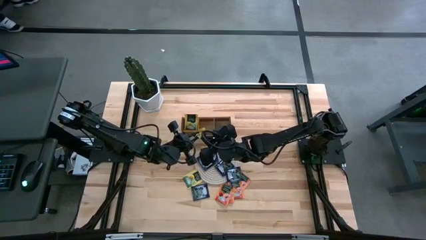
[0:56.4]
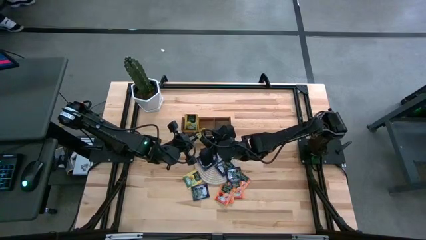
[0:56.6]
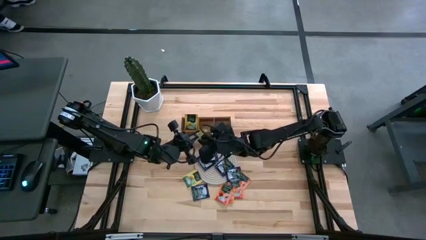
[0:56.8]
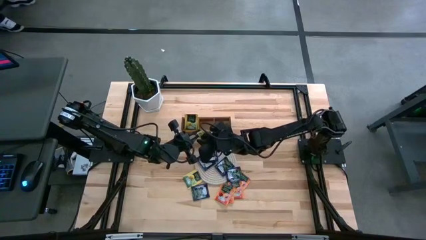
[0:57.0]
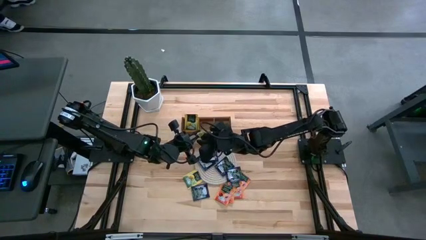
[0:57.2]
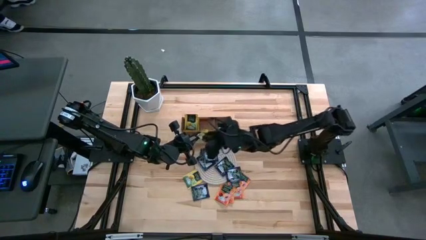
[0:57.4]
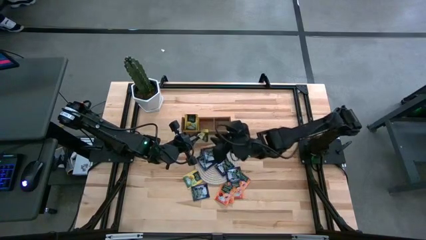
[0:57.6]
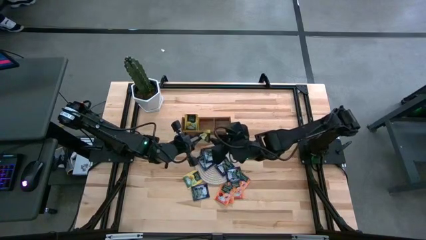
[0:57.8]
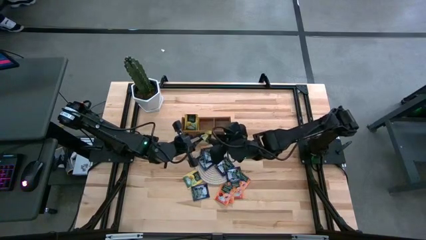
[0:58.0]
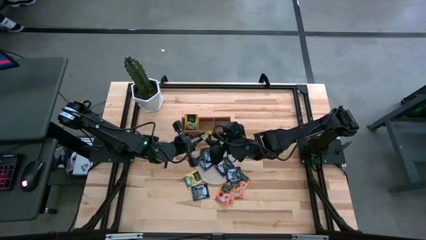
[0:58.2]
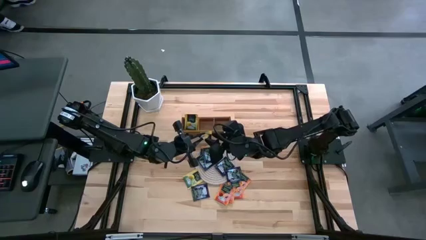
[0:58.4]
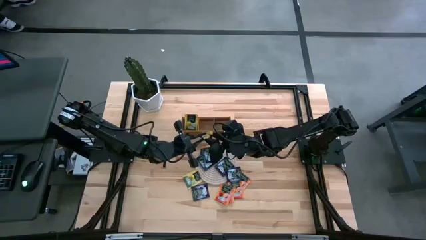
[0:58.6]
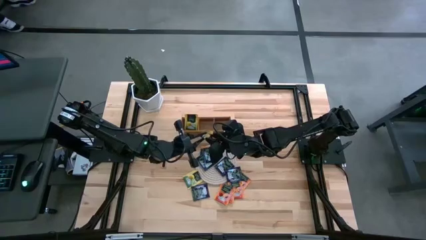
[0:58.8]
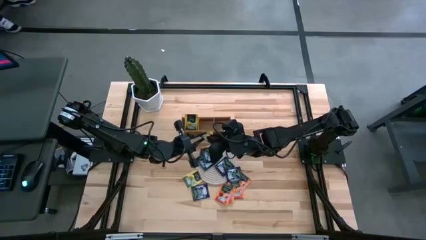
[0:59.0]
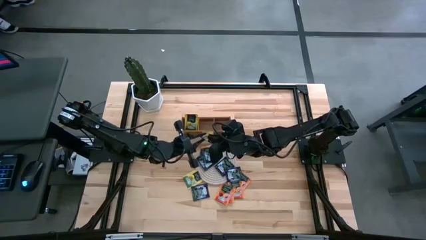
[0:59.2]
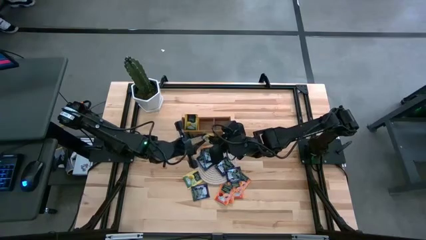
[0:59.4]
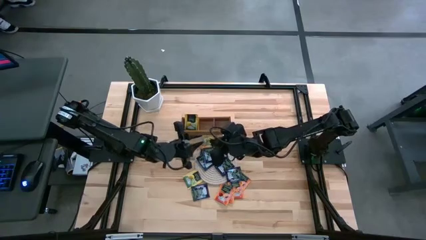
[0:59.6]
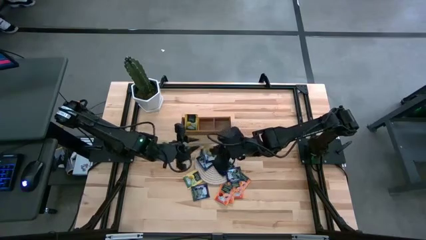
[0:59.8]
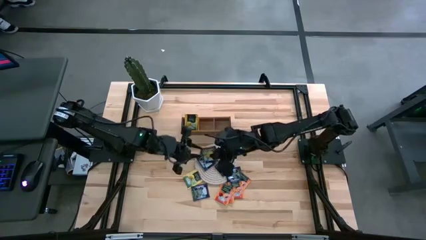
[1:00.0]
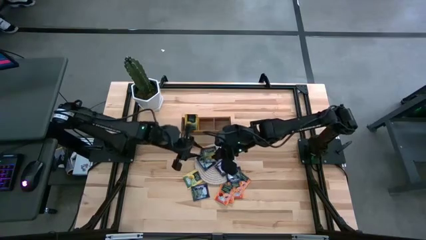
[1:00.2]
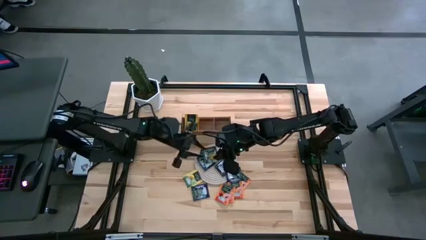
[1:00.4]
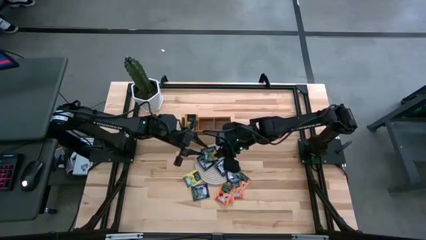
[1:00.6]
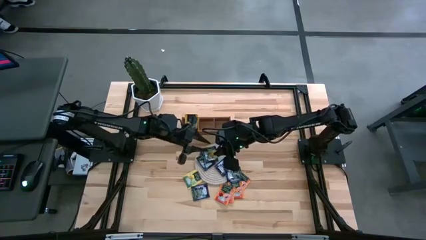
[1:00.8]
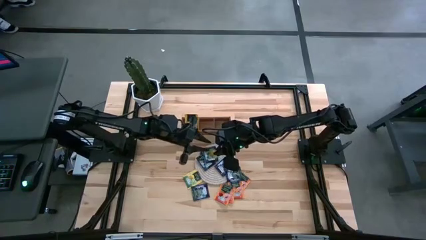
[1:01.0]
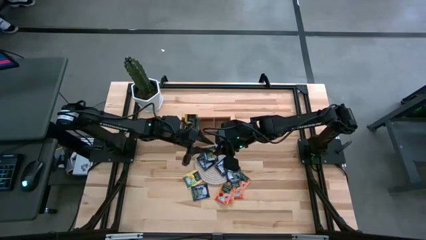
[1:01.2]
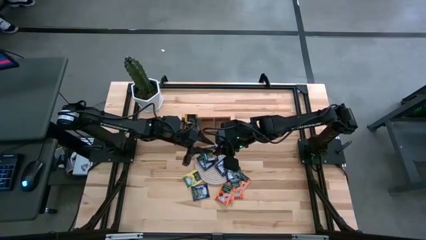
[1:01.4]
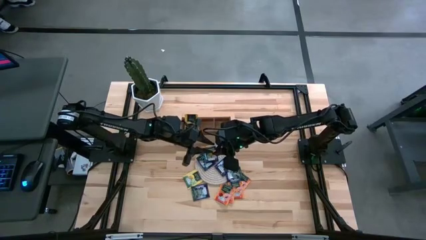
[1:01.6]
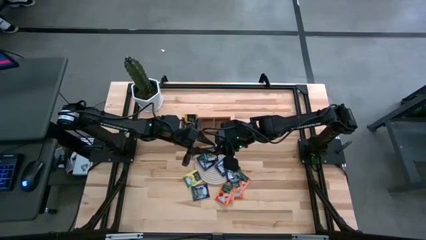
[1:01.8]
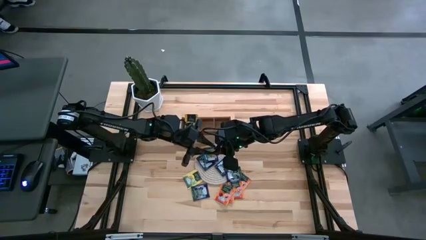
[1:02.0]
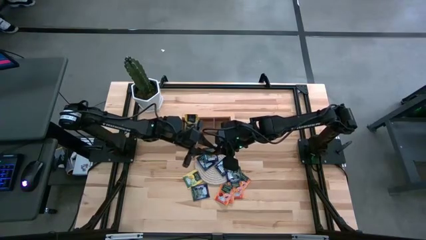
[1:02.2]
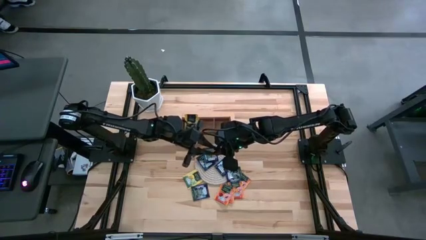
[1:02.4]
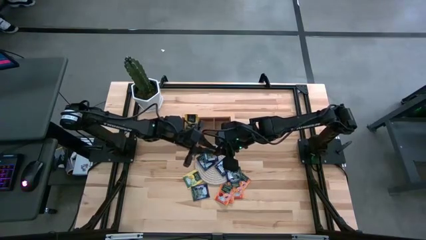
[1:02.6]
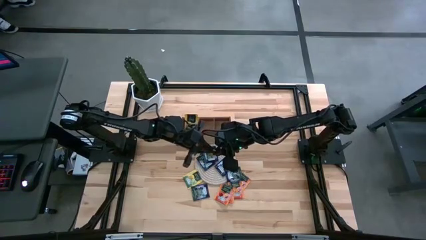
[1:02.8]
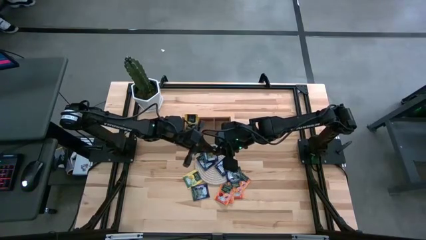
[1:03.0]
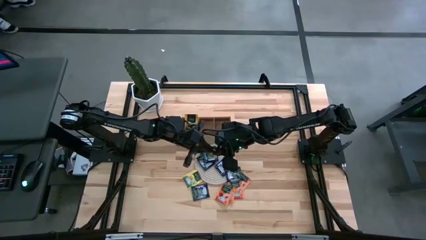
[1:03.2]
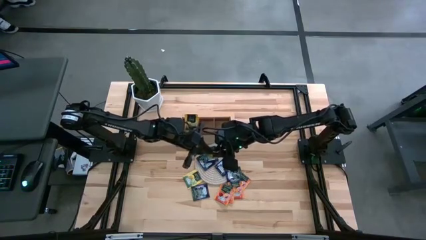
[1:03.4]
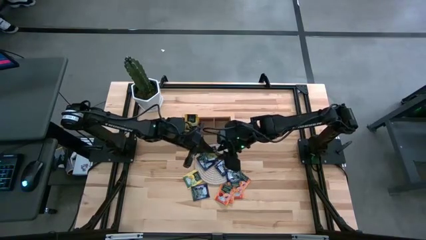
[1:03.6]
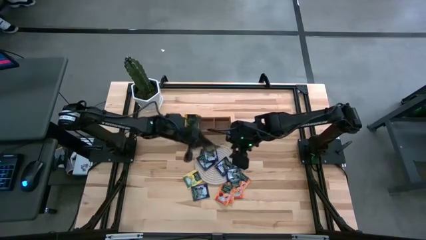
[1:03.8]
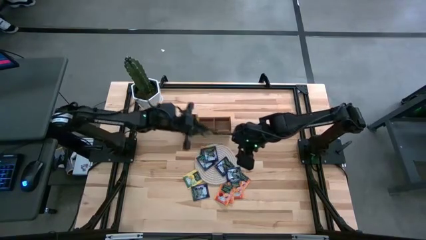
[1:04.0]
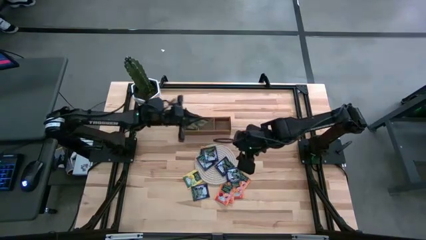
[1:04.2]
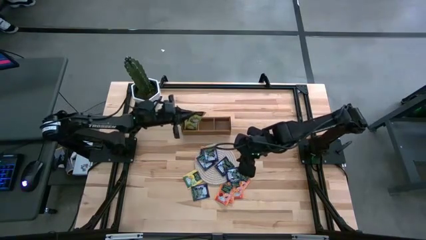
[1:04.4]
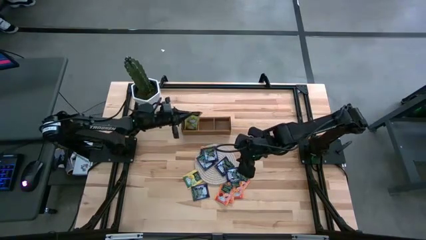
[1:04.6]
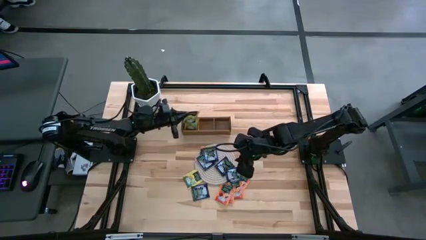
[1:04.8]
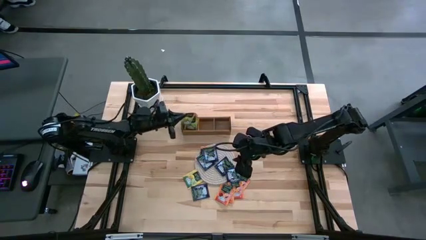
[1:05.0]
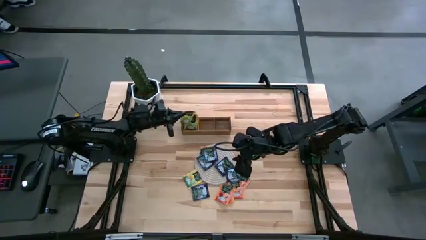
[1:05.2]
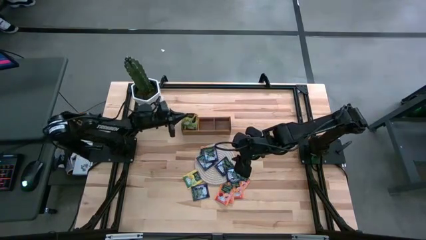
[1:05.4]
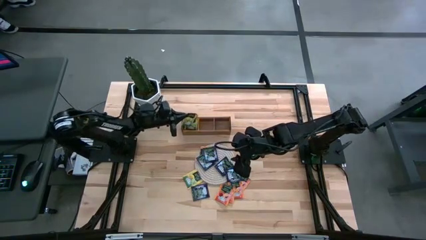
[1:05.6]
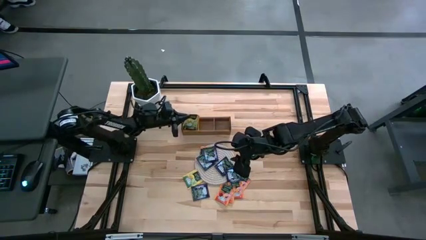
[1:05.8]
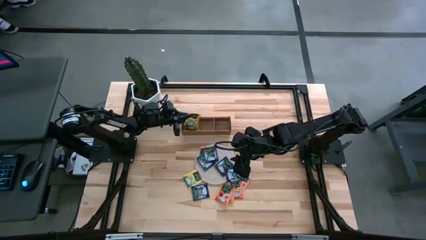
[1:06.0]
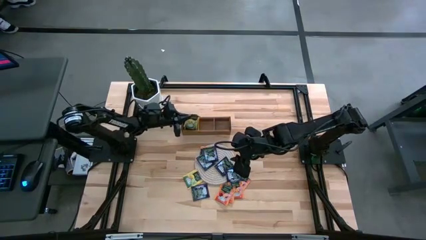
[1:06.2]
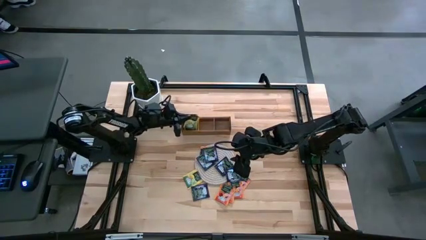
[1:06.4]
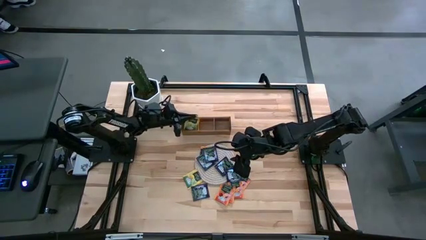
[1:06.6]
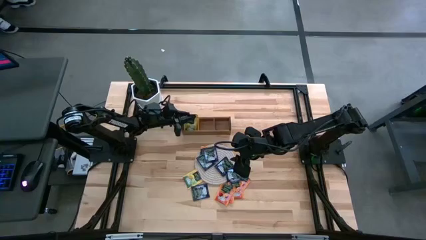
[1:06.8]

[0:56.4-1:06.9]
Task: Pick & Place Tea
Put the yellow tea bag into the left section of the wooden organizer

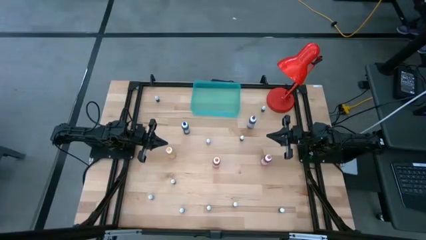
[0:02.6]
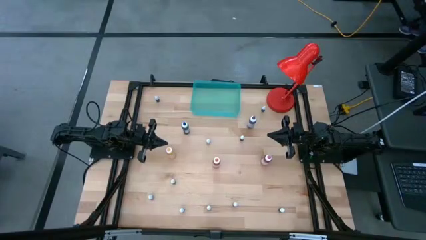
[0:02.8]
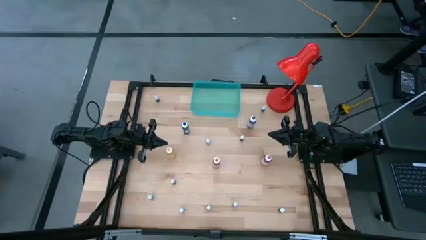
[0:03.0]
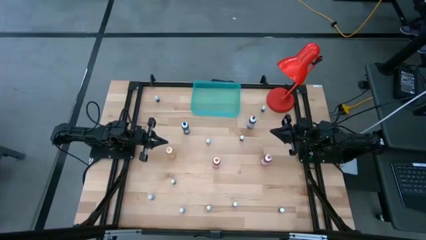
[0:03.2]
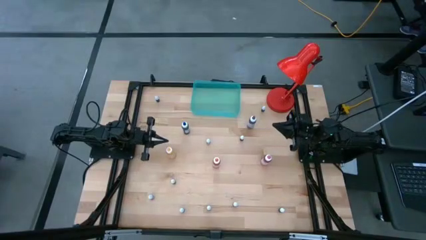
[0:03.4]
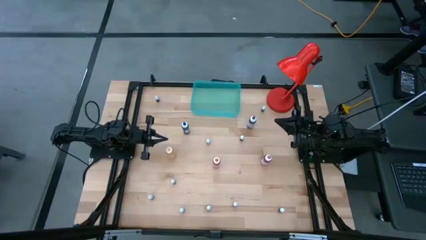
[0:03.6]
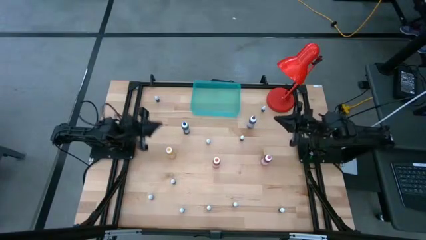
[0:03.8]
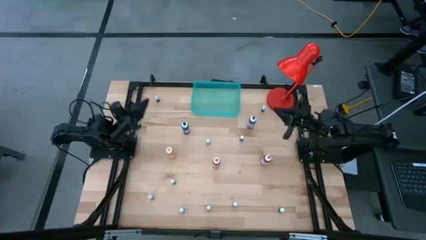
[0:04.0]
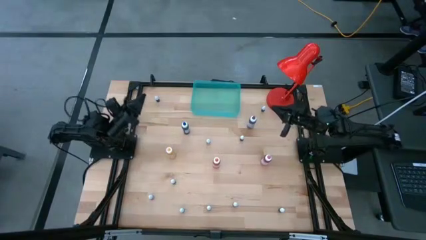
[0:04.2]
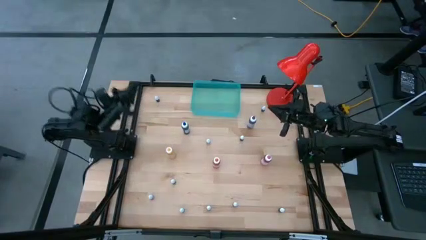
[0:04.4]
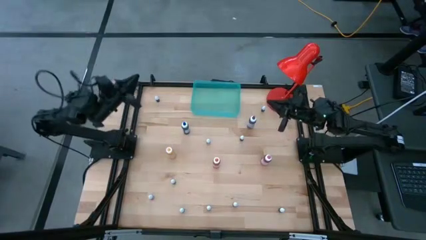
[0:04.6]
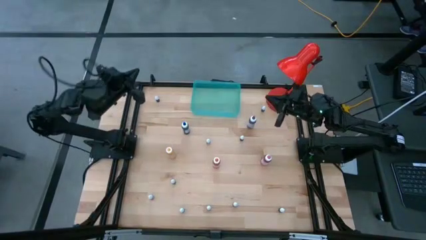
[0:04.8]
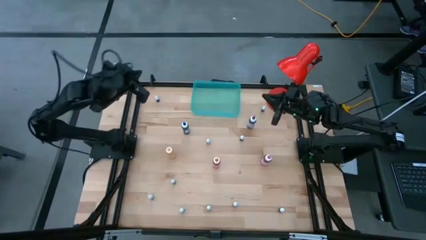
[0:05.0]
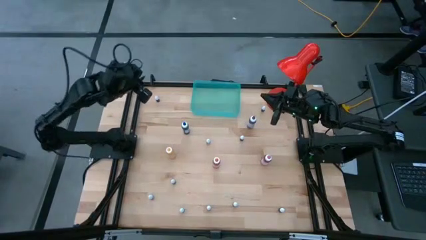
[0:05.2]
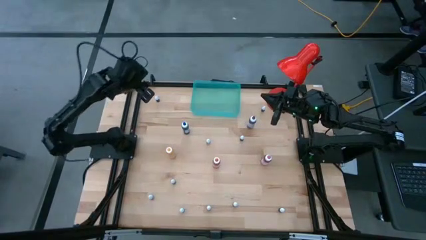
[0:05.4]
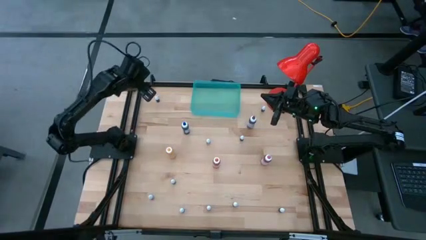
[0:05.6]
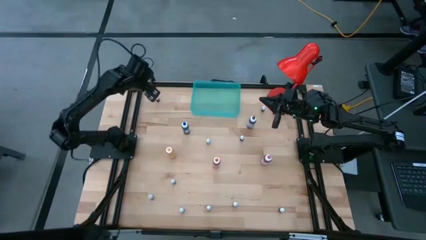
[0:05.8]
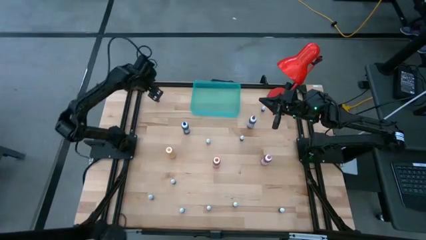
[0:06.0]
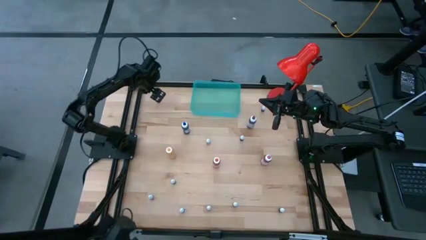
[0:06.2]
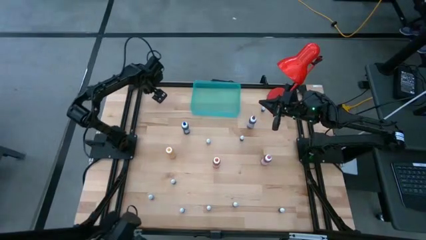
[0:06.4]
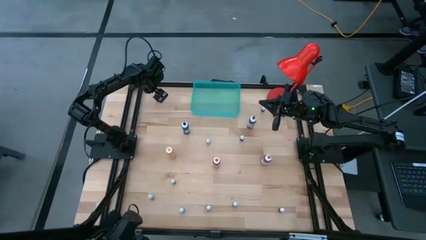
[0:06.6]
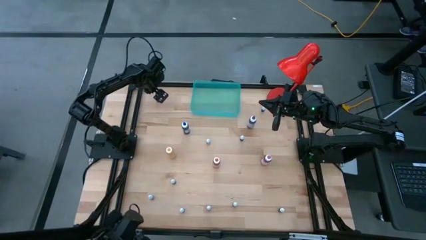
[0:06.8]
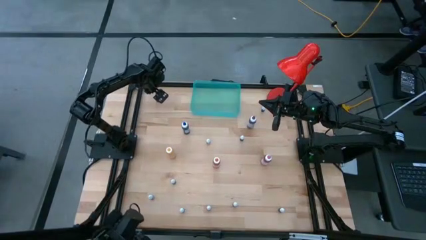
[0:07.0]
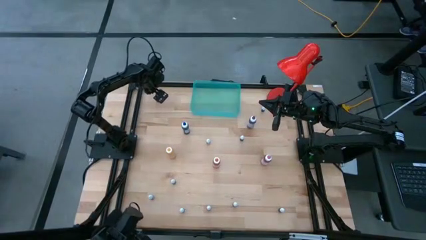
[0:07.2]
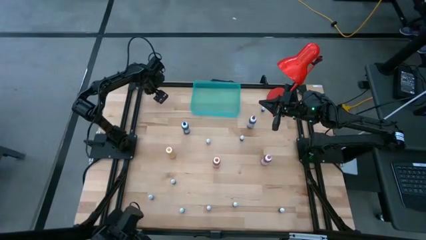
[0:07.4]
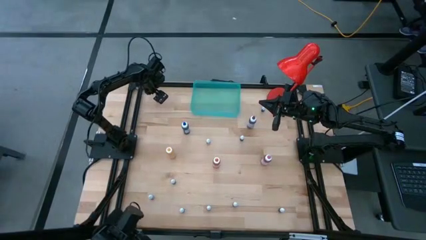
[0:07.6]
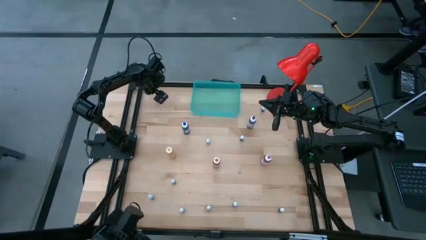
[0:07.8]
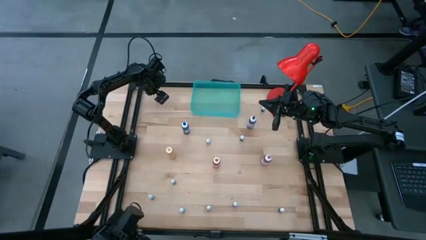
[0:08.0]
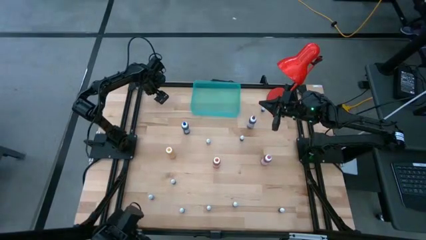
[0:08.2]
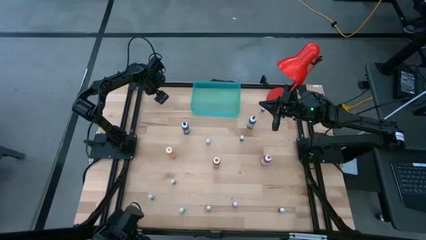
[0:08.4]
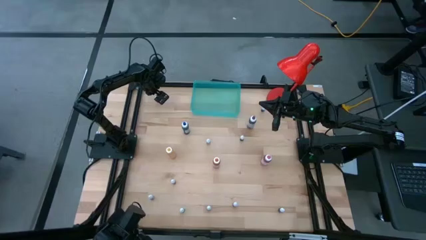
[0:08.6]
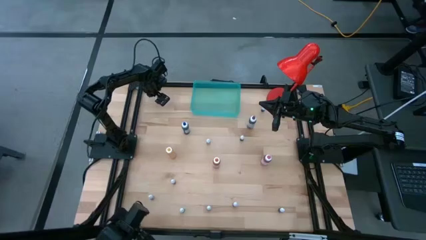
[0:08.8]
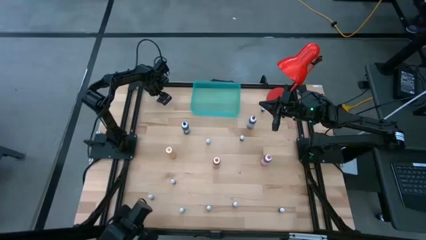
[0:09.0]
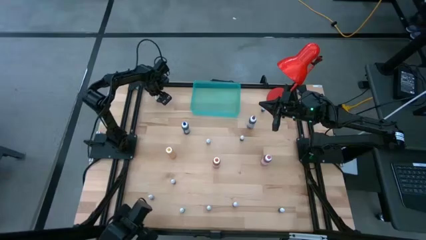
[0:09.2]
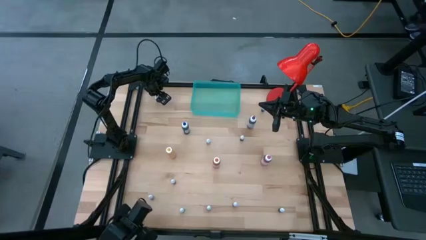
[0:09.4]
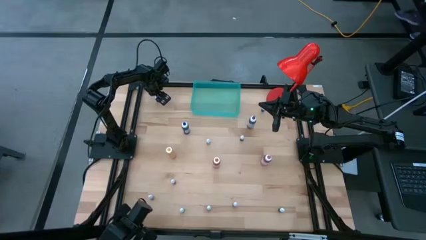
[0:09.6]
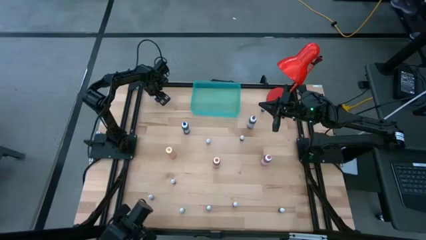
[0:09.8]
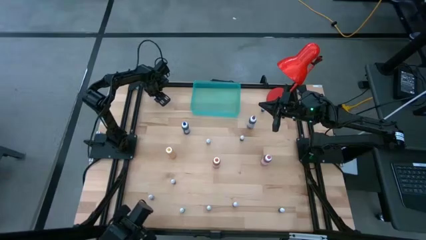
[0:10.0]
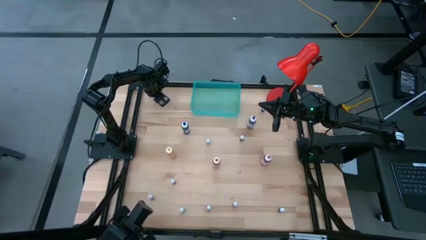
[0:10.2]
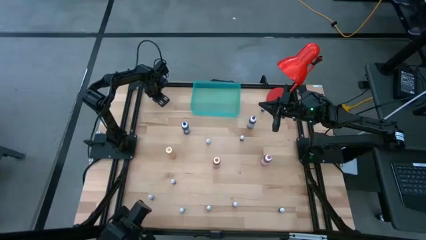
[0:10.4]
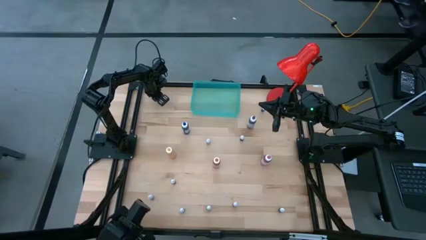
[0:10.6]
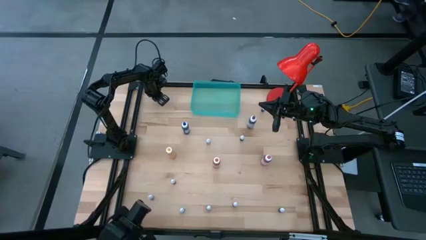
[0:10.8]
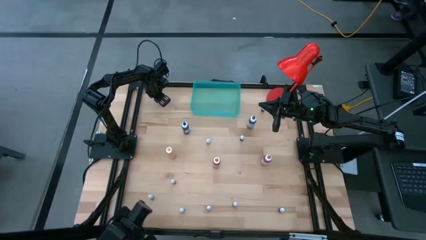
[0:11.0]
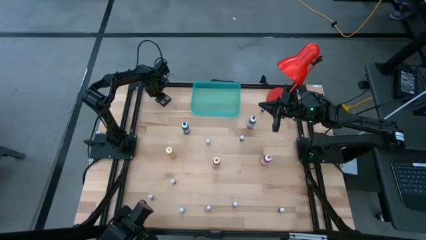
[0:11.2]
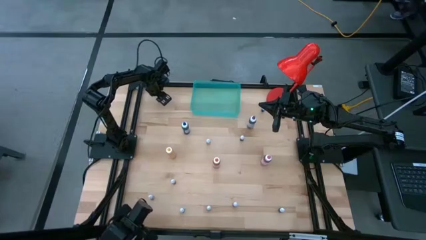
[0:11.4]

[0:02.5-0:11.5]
Task: Pick & Place food coloring
Put the top left black food coloring bottle into the bin
